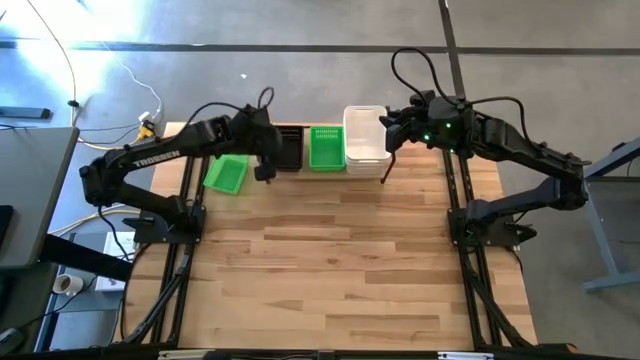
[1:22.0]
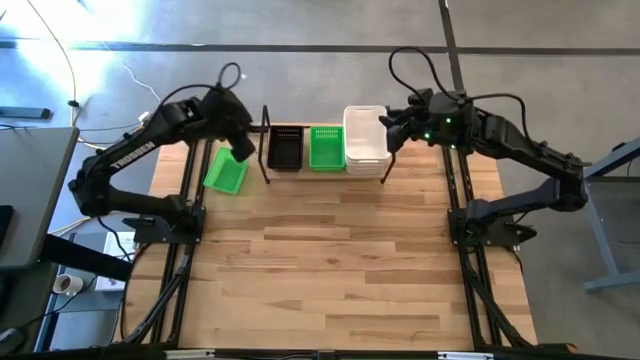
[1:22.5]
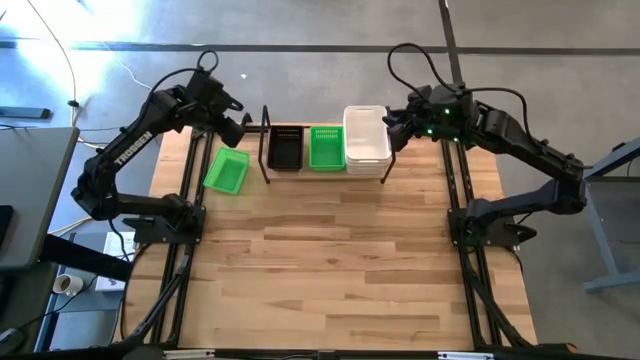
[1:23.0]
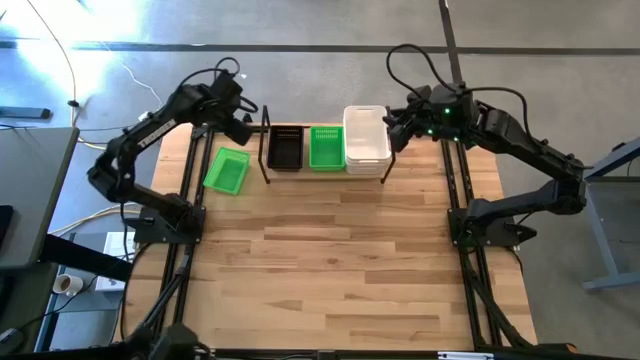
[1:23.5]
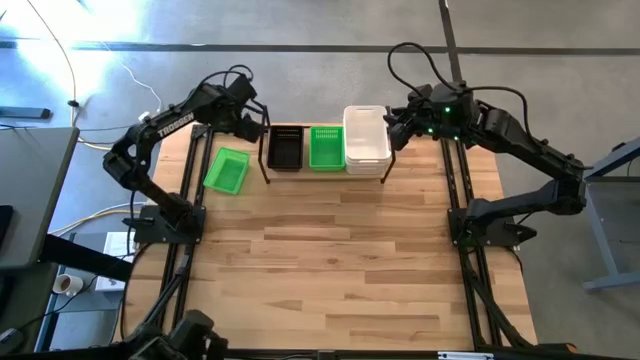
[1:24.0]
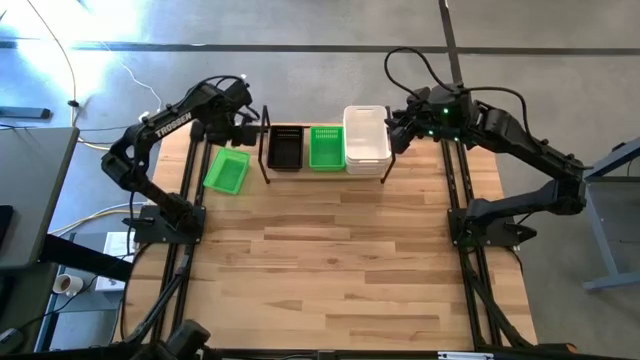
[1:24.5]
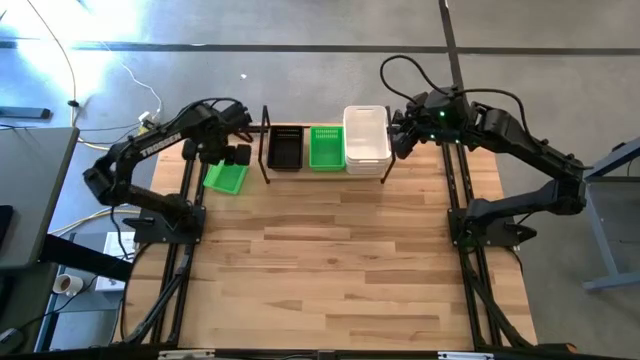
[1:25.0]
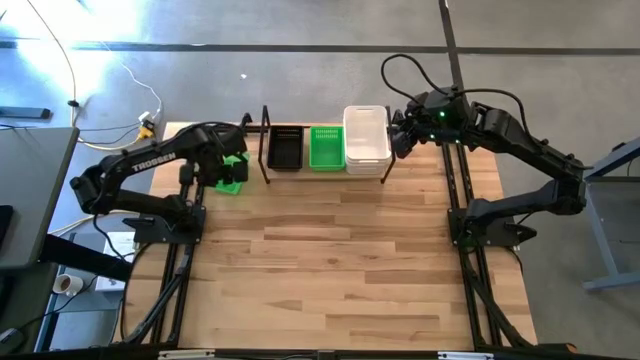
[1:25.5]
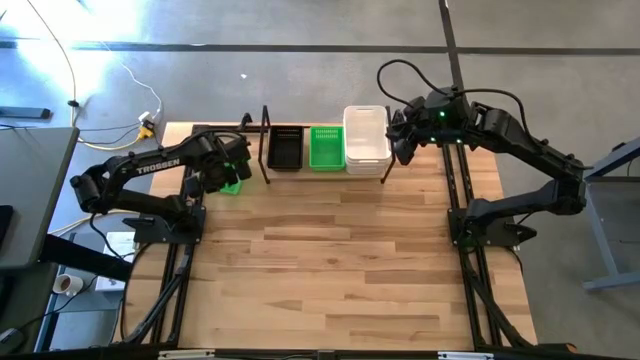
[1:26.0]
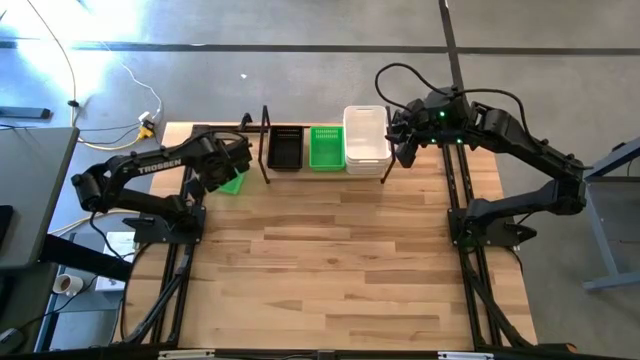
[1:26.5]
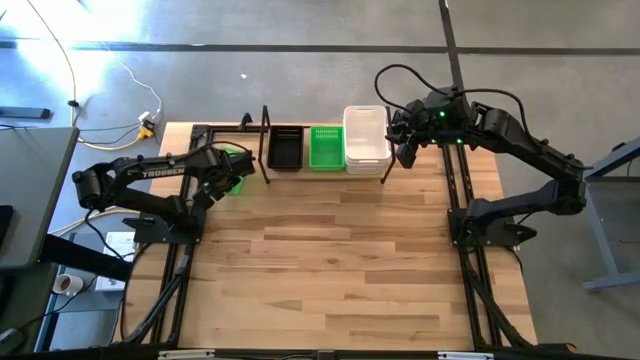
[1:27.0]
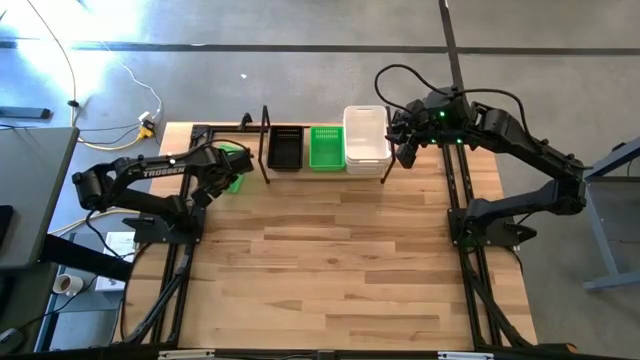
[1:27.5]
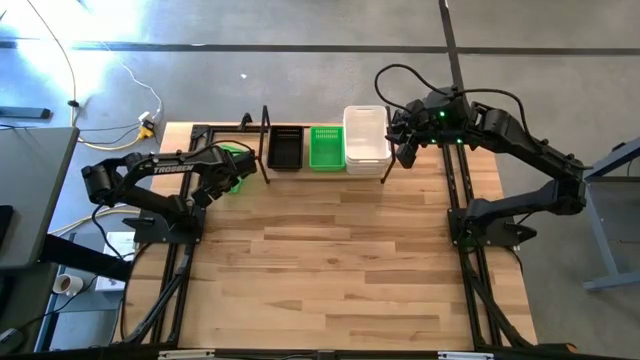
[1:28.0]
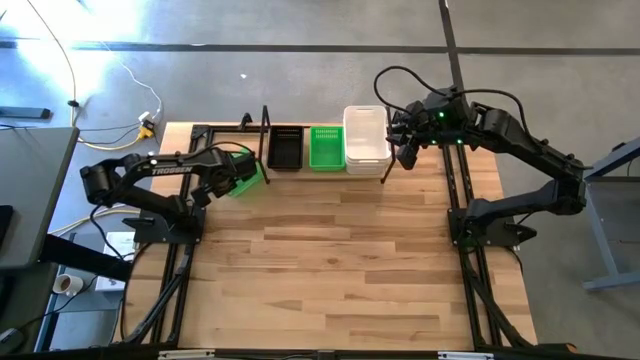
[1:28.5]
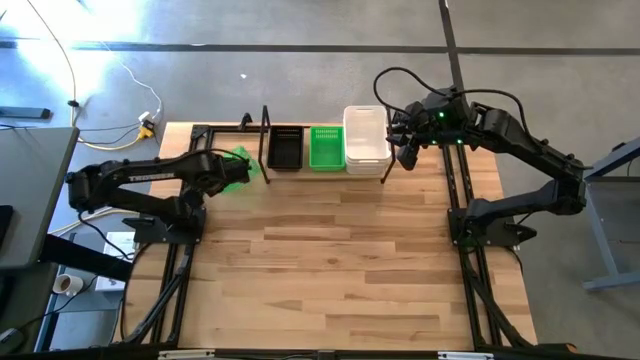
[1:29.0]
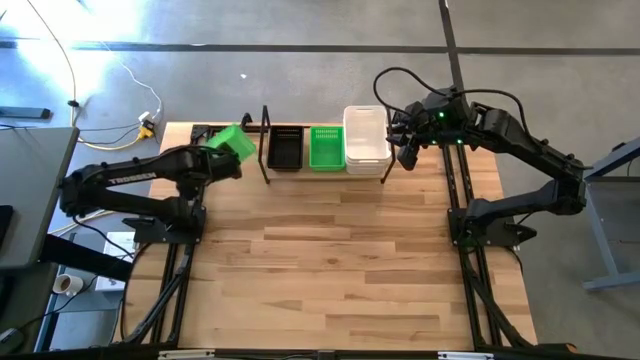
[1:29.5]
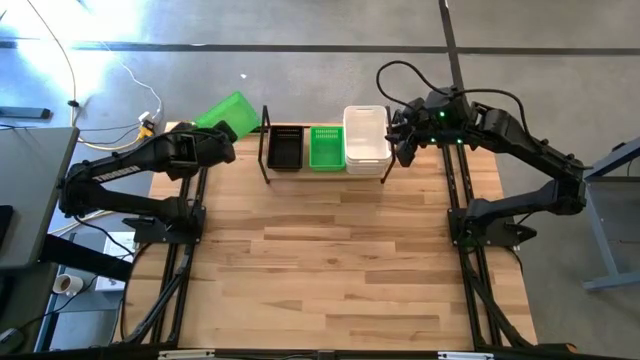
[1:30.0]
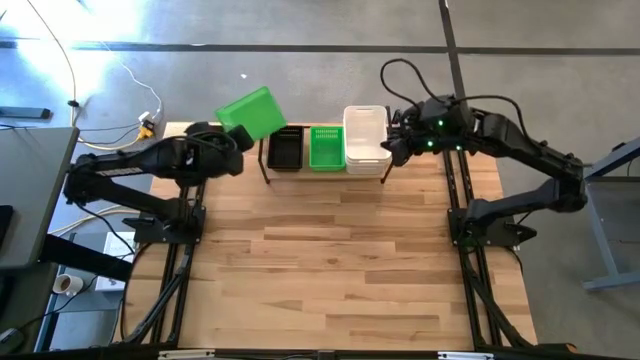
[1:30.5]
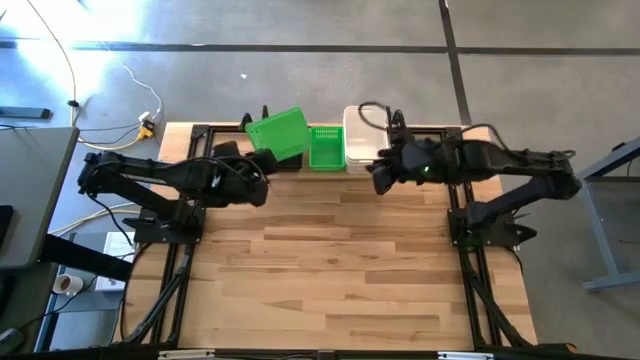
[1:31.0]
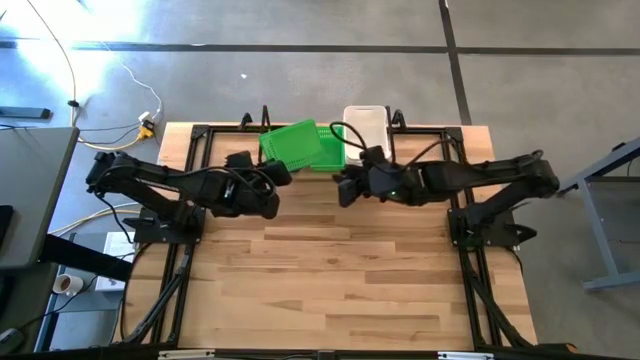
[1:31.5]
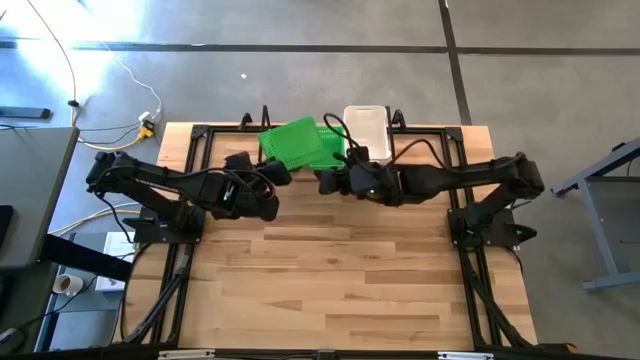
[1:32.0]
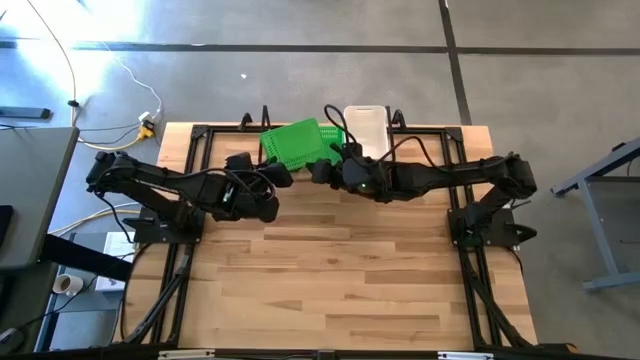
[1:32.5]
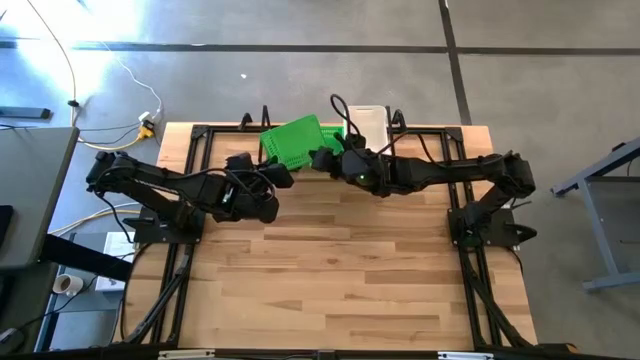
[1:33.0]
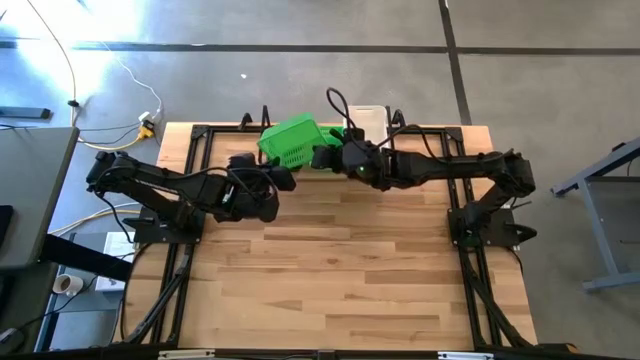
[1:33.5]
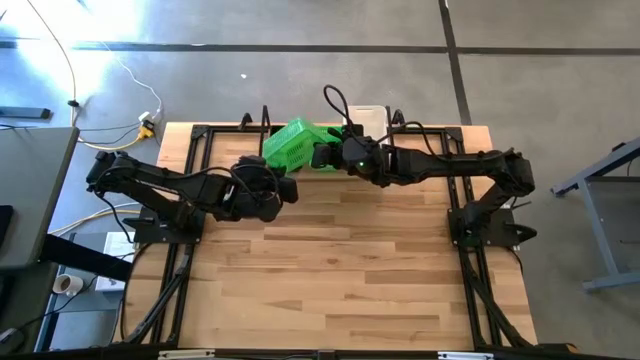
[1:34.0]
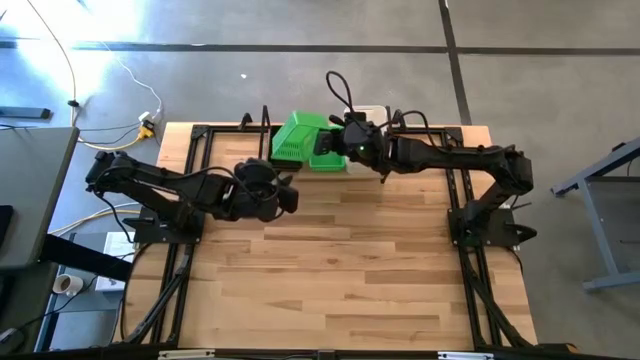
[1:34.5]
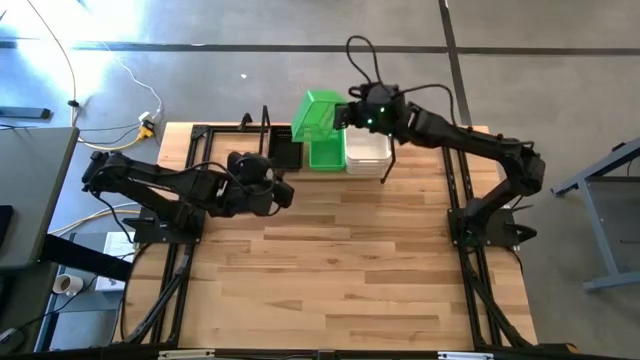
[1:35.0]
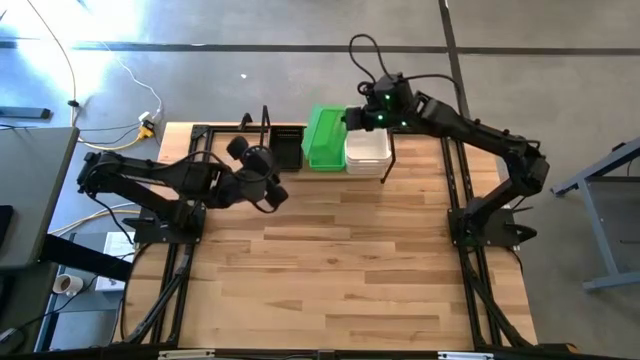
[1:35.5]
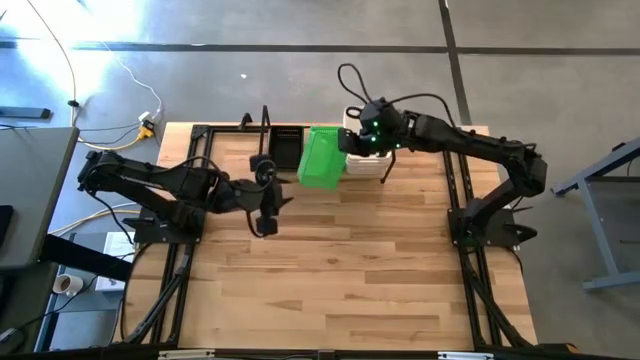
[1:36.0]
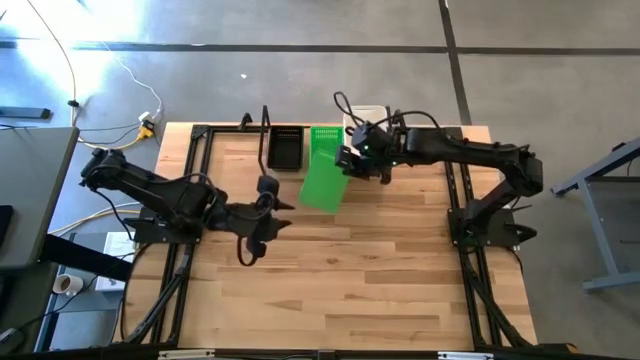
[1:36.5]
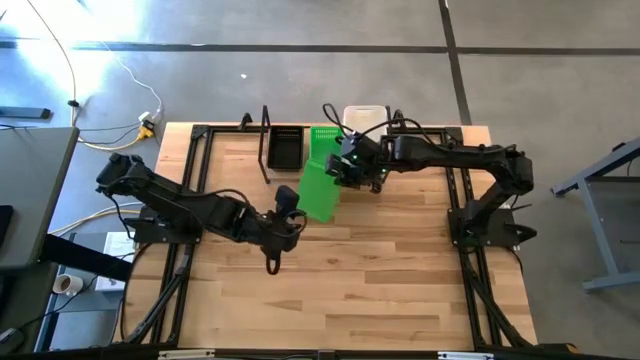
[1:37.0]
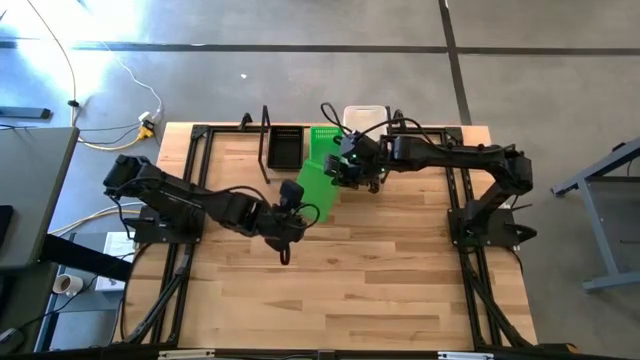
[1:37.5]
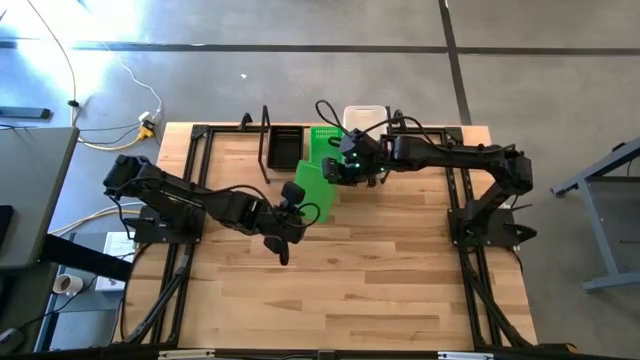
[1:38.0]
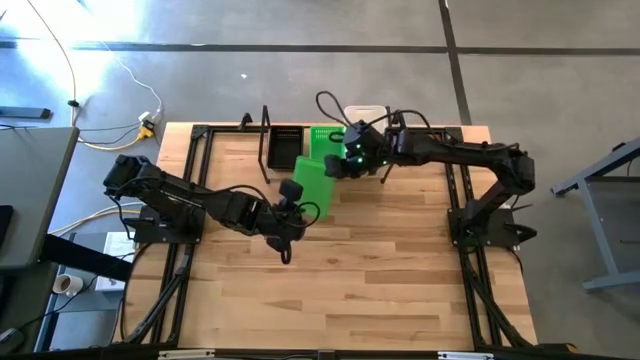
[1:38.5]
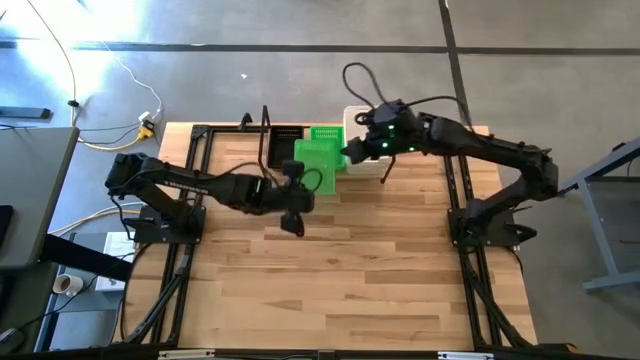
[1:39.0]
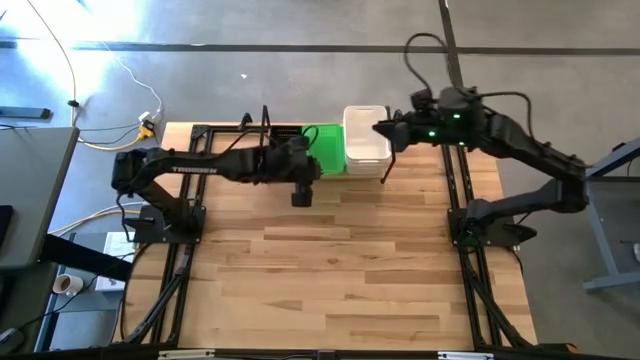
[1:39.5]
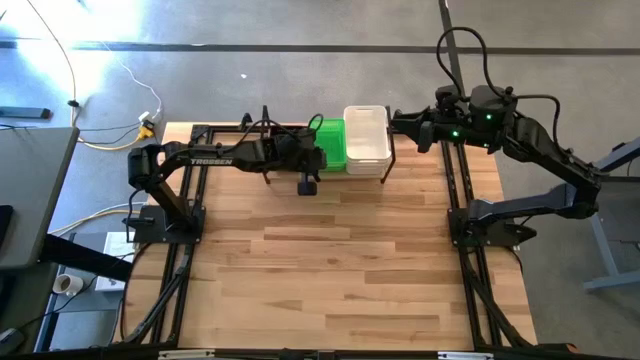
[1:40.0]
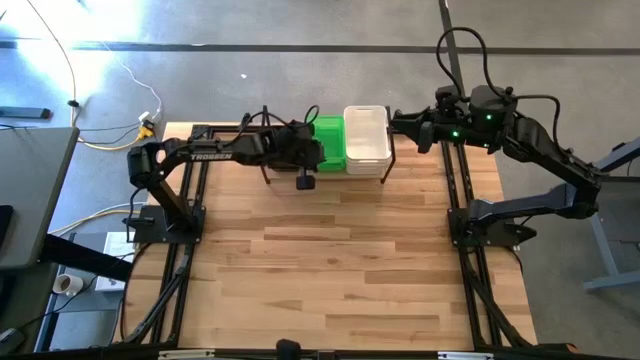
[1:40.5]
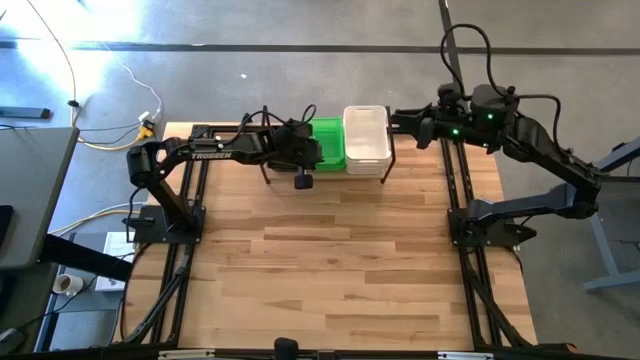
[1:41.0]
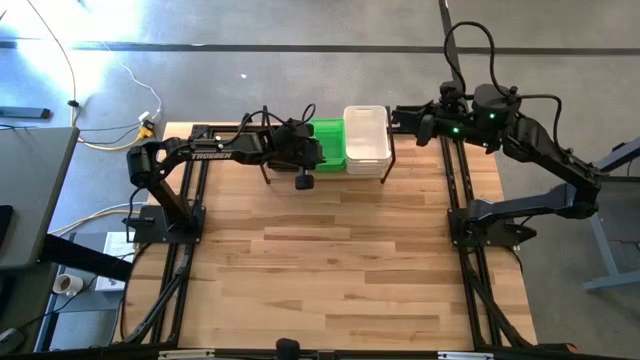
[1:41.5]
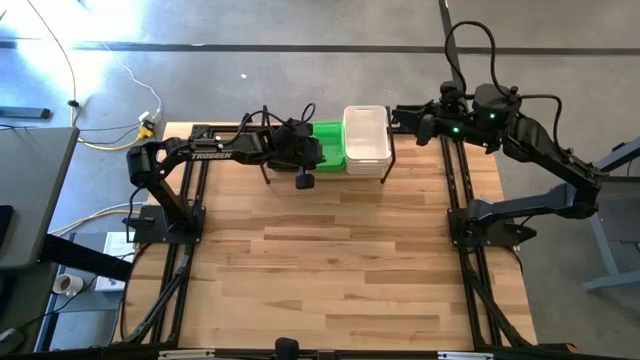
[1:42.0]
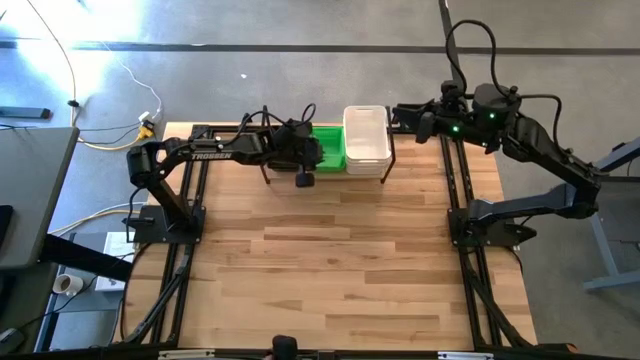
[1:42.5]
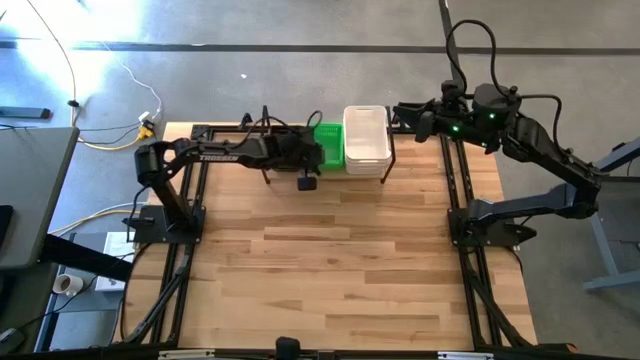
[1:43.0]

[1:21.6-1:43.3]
Task: Stack baskets on shelf by color
Stack the green bin on the stacked green bins on the shelf
